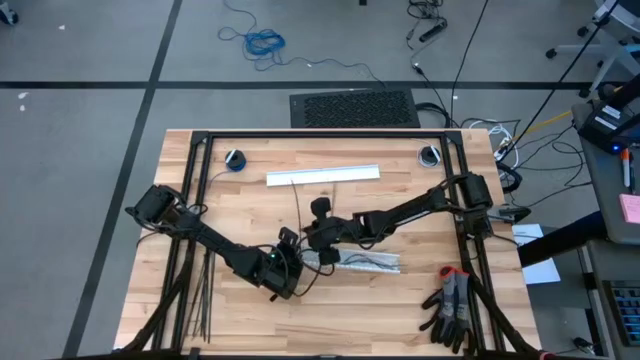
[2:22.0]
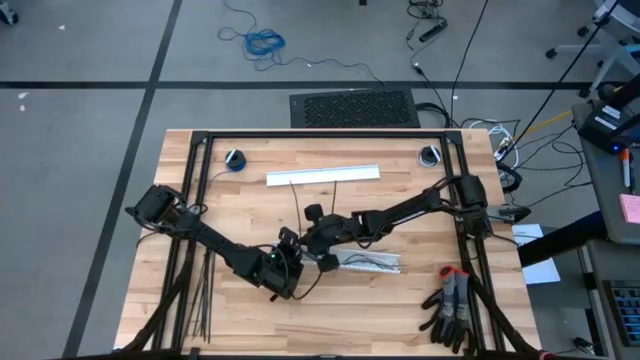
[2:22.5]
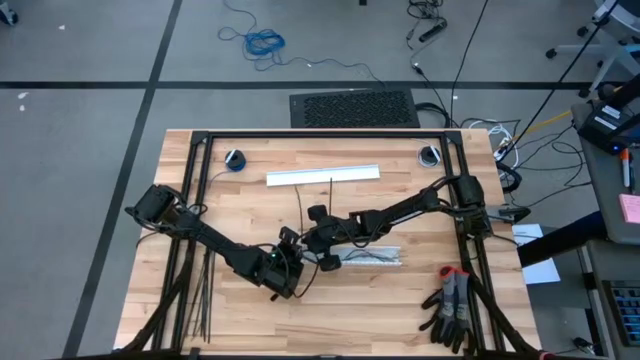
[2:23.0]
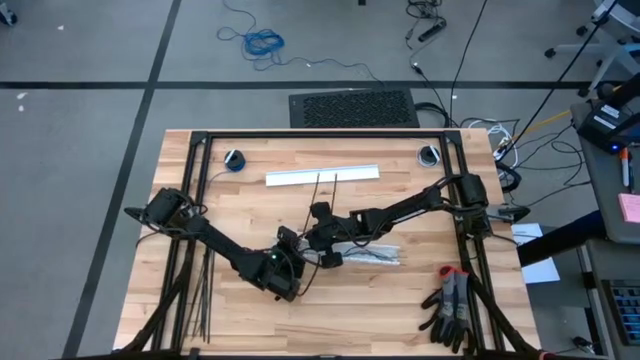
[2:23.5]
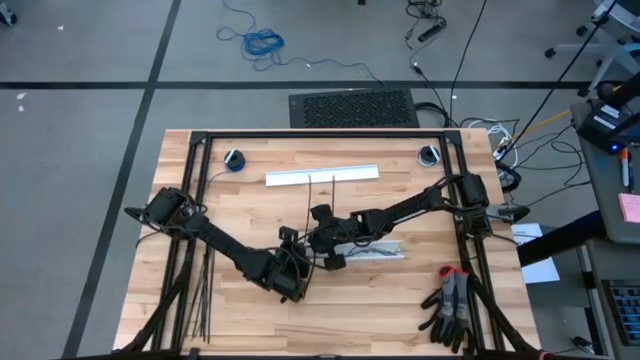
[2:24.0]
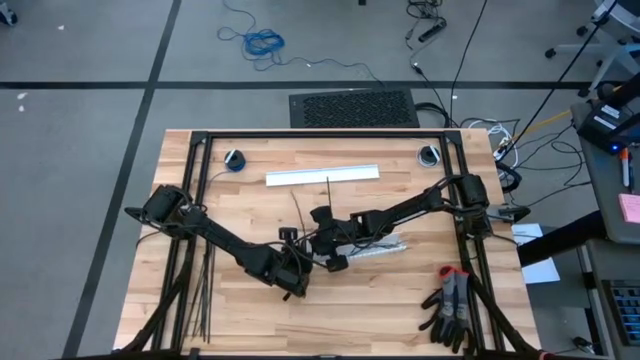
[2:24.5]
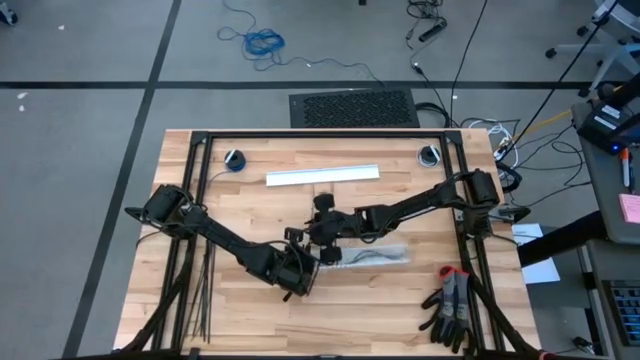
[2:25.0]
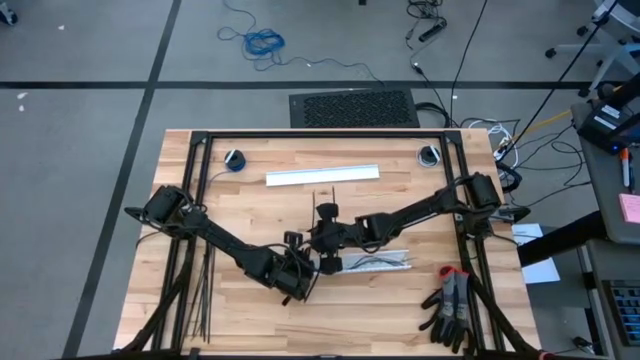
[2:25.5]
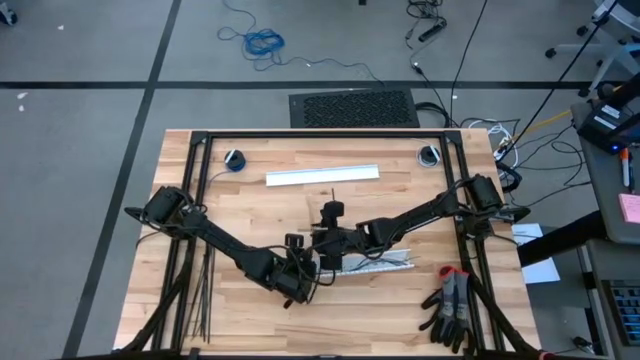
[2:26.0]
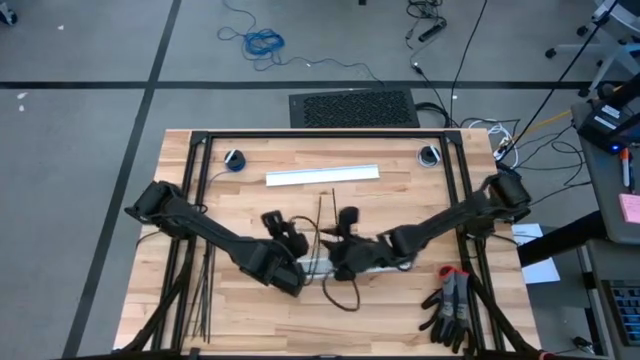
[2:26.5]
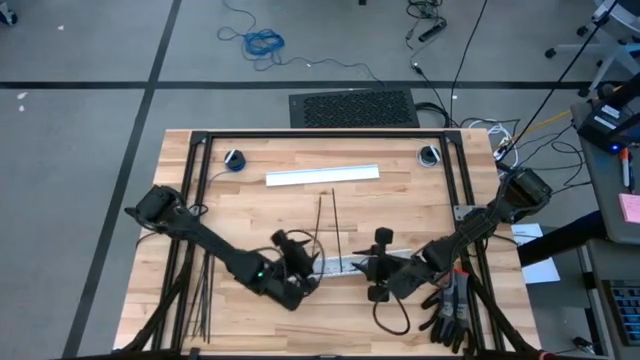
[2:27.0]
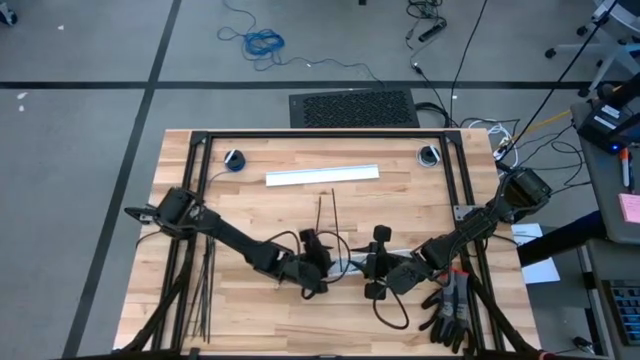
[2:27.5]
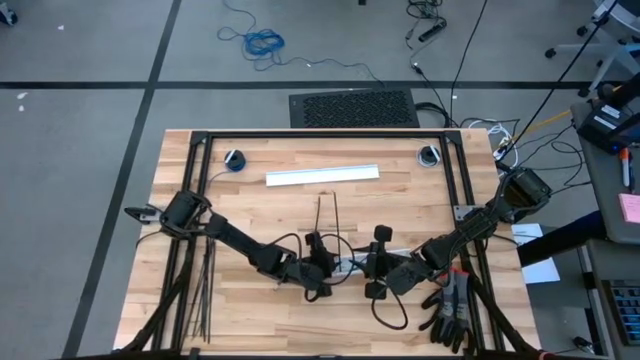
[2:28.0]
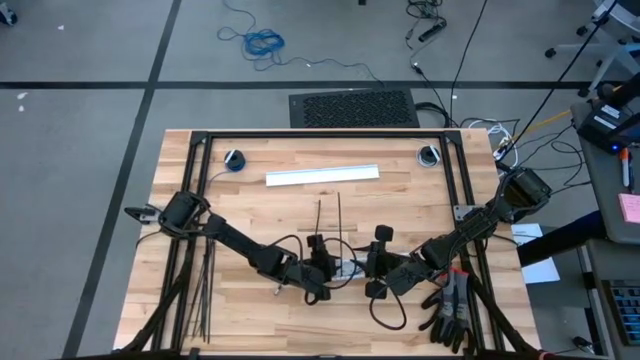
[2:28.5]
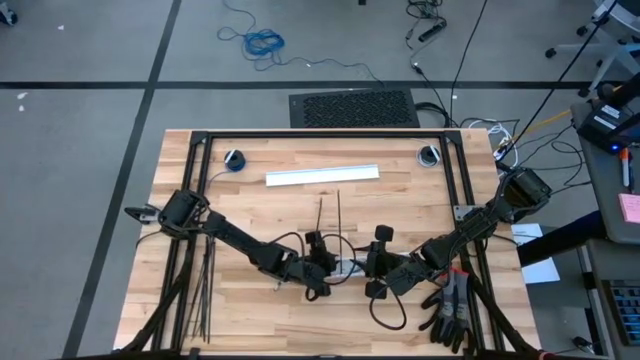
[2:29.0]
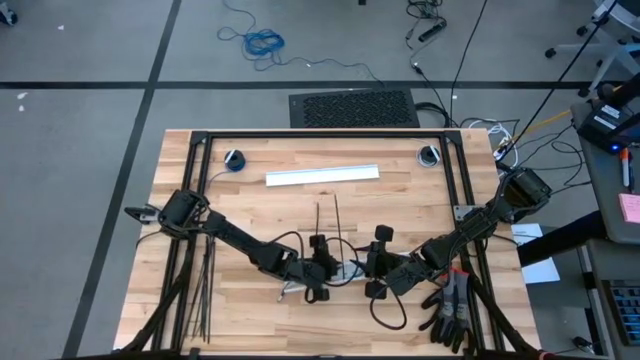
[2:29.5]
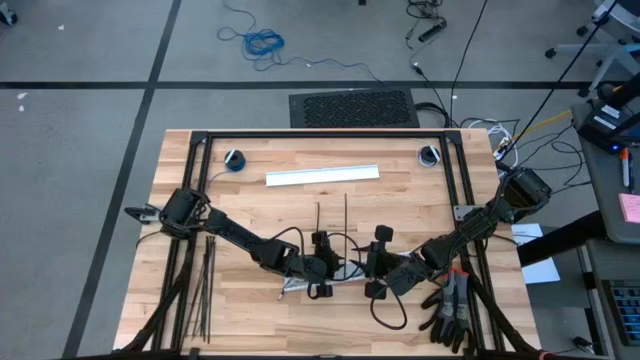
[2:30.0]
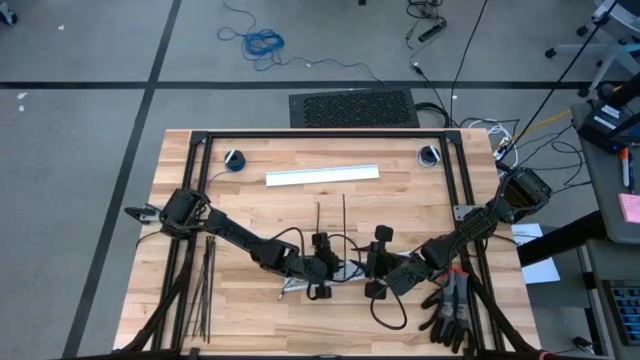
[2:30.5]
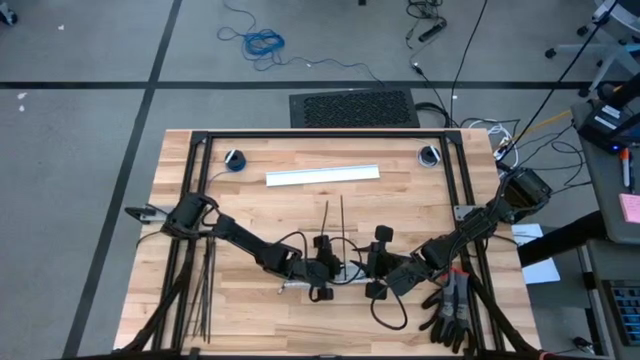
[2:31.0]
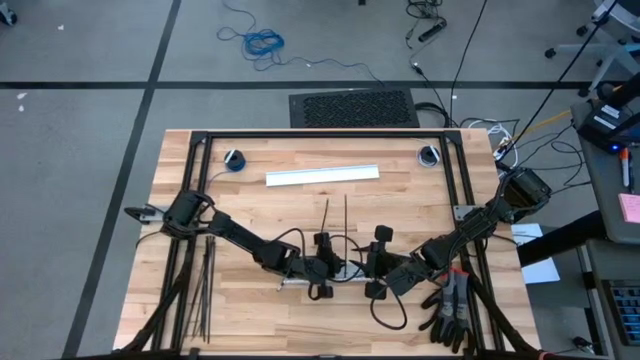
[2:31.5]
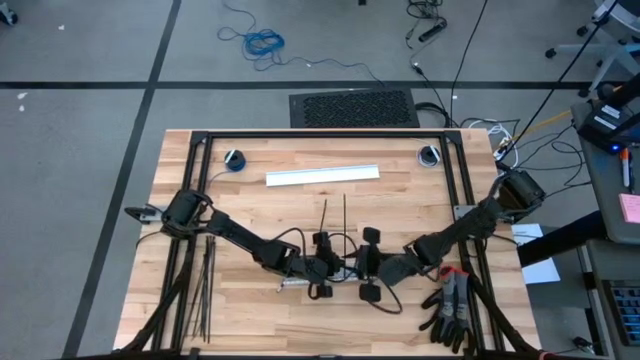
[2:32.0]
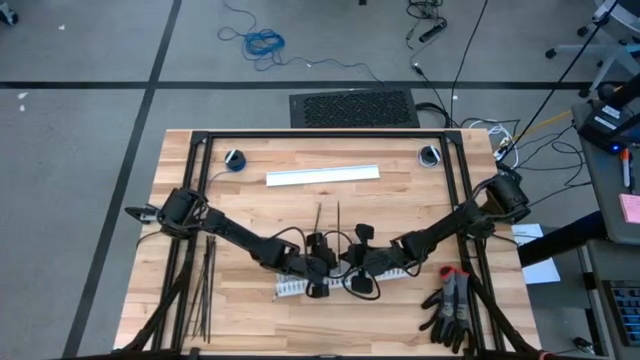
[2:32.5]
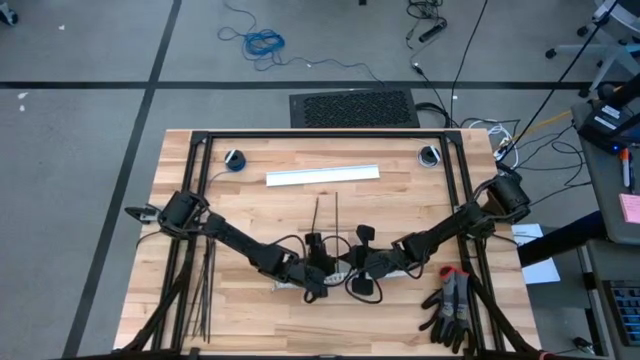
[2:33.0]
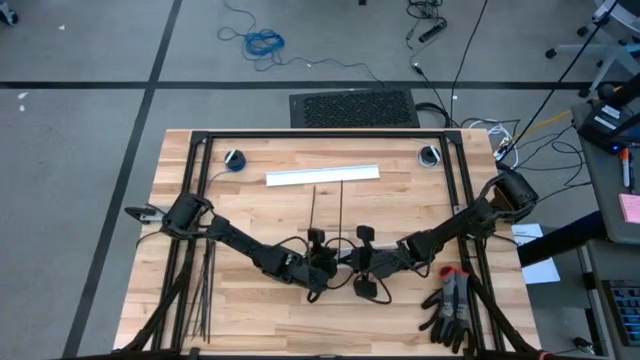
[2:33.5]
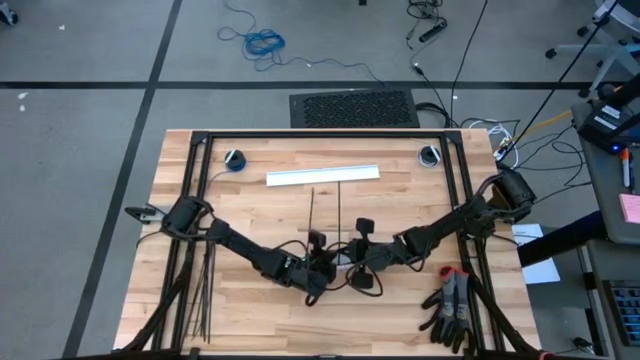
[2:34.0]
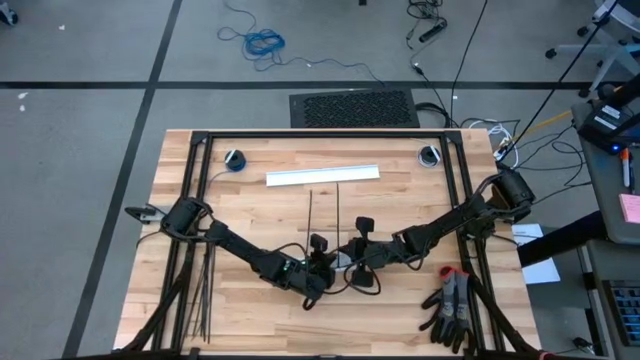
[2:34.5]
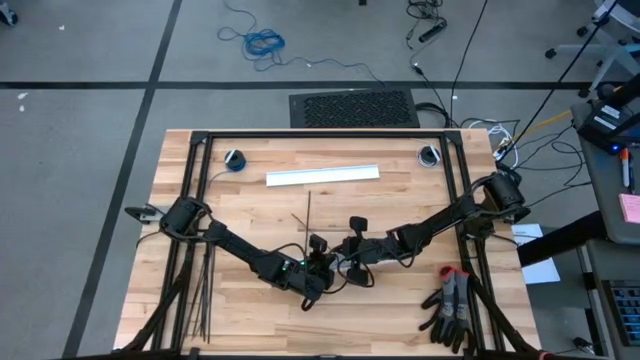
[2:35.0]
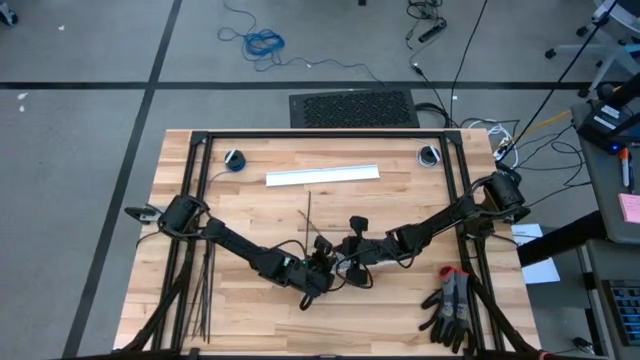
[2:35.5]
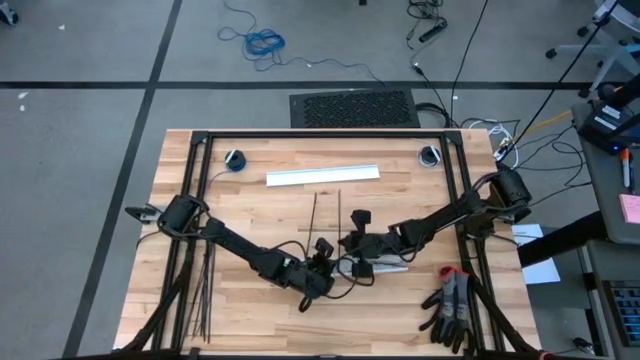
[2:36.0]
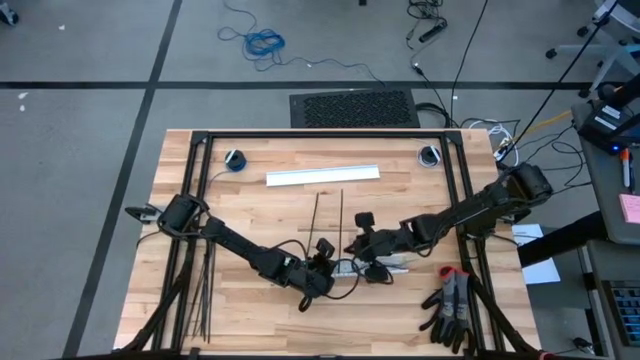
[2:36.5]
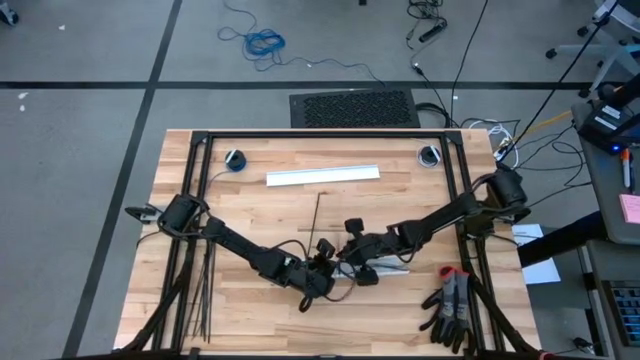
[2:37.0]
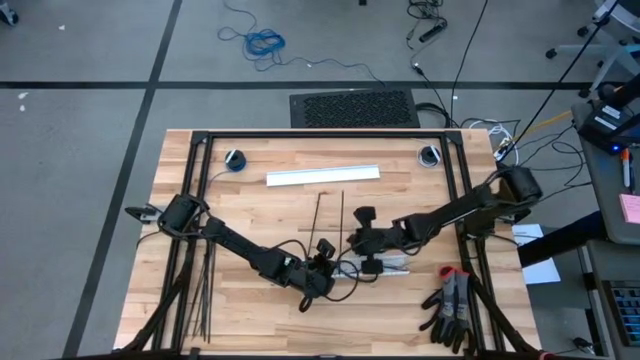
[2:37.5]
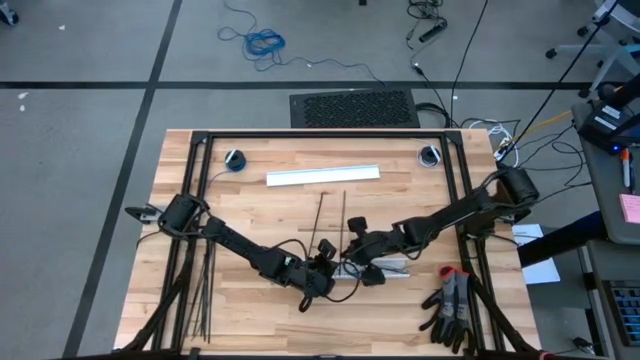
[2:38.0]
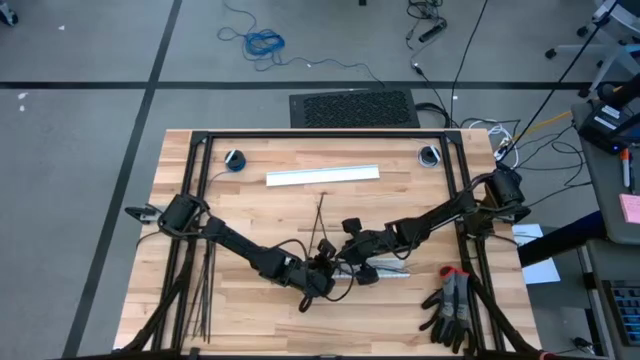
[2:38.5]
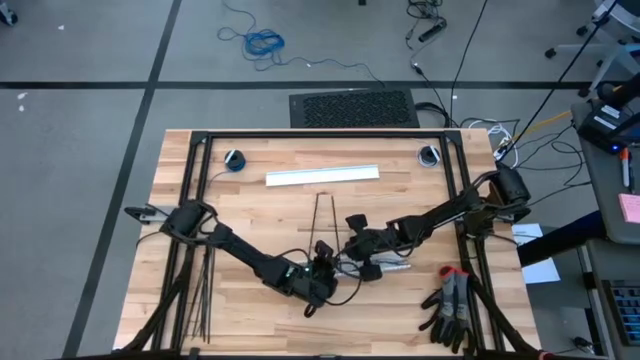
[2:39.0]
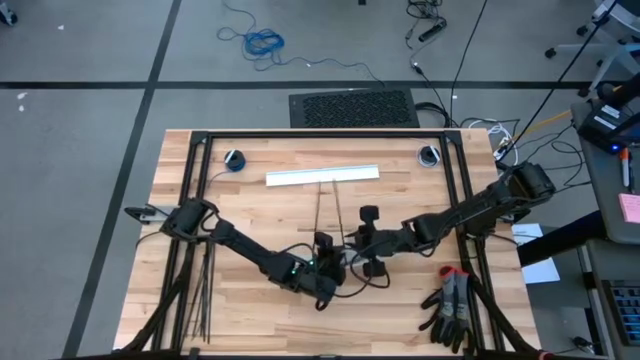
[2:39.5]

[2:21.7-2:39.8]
Task: Ziptie cables
Put the zip-tied cables into the white cable duct

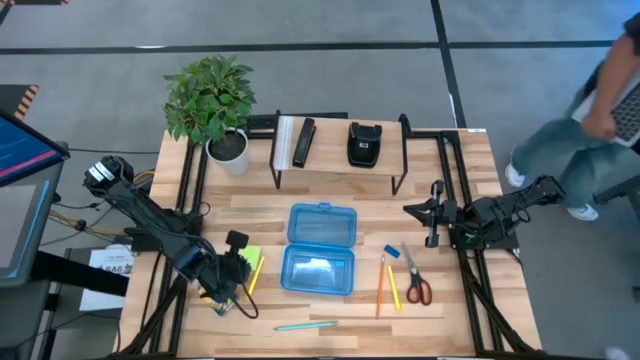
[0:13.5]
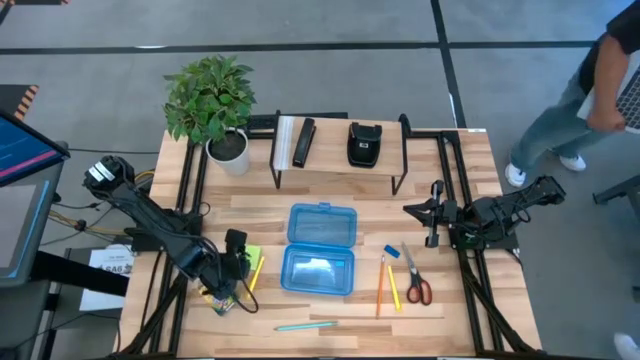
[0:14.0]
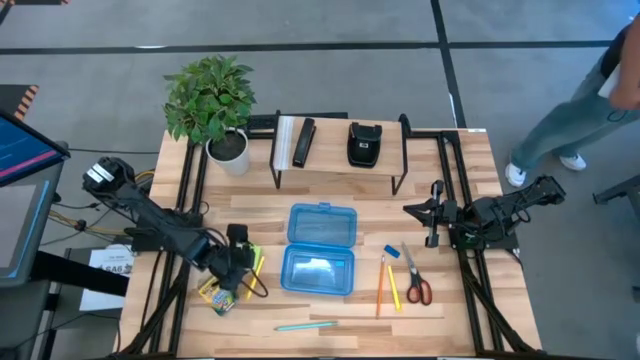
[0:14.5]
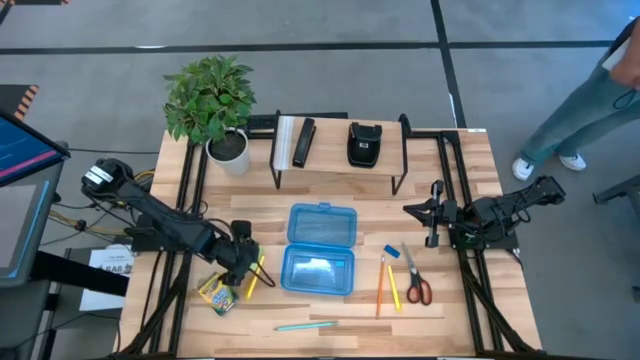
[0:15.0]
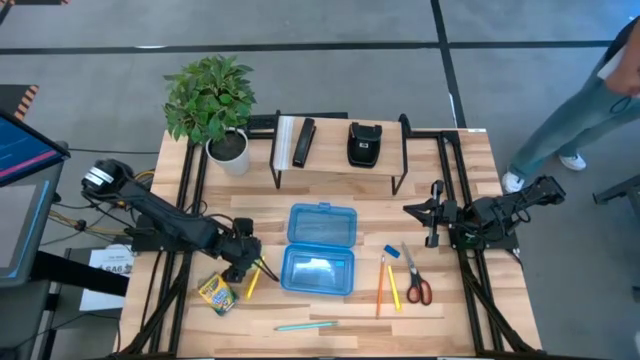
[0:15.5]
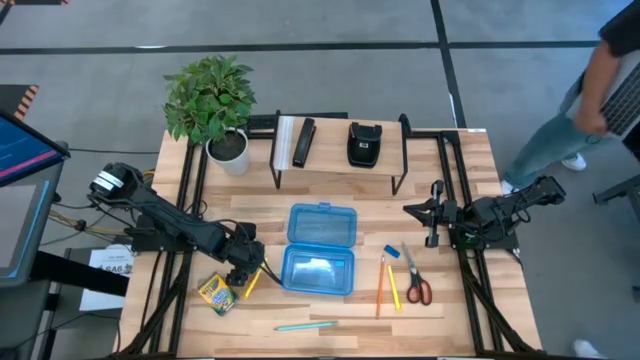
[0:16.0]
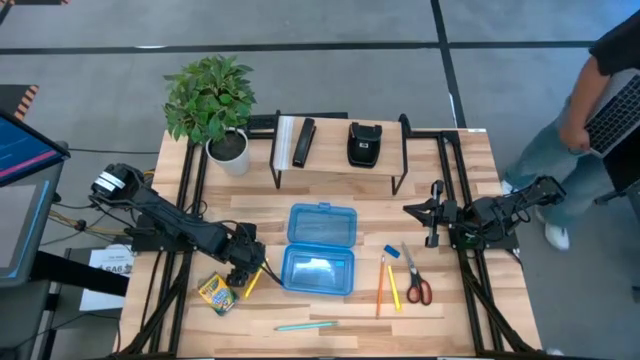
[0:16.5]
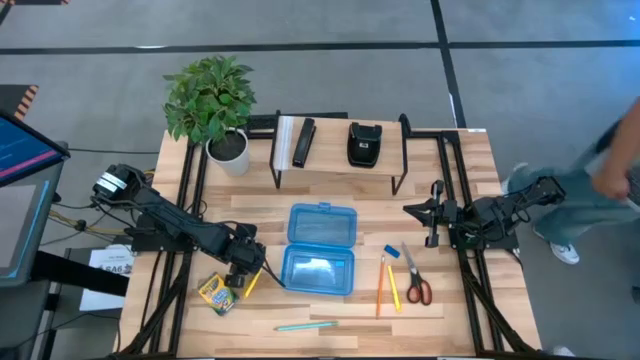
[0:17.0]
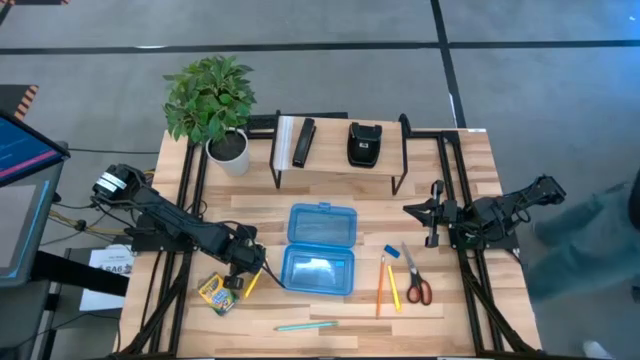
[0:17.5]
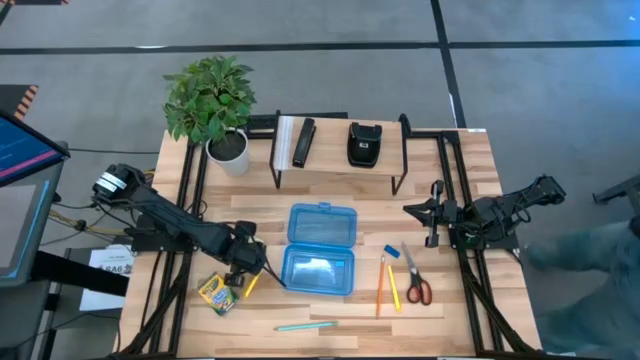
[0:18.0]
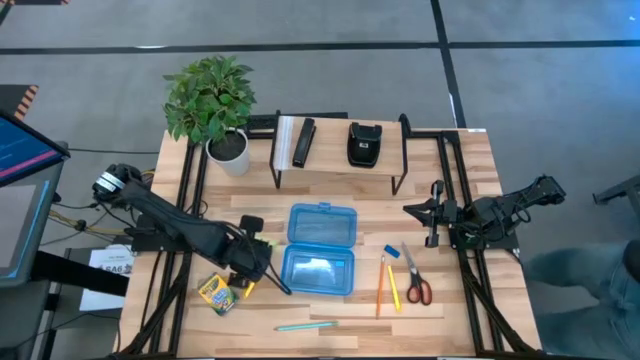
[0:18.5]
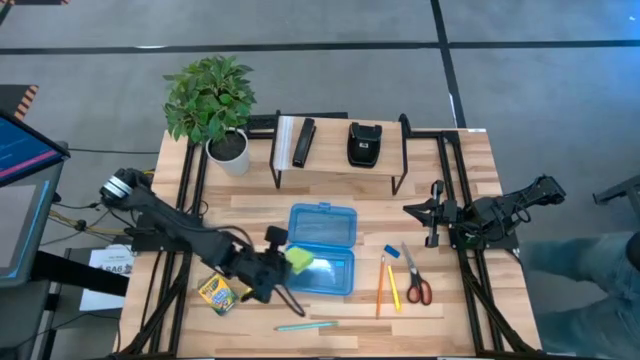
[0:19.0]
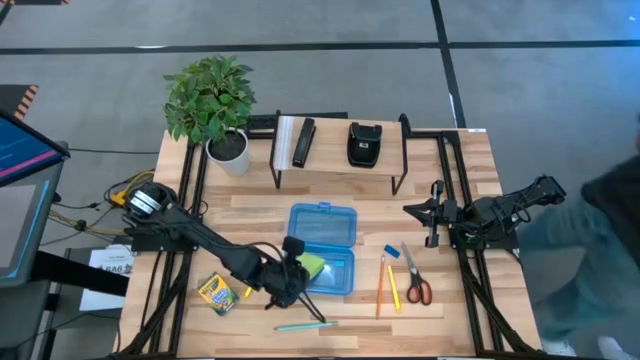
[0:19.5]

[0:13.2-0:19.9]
Task: Pack school essentials
Put the green sticky notes into the blue supply box
